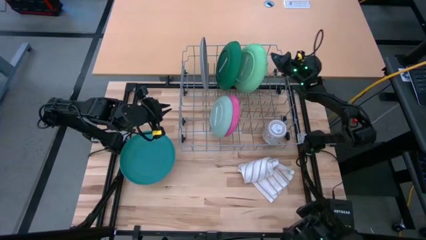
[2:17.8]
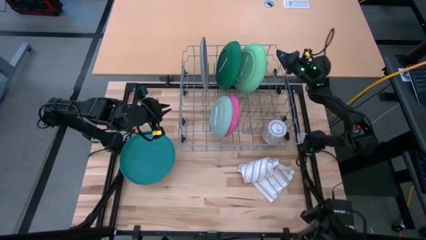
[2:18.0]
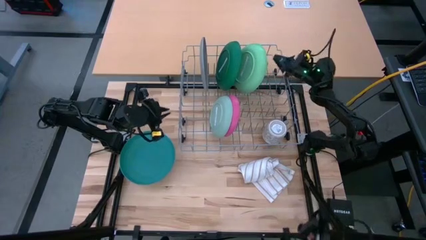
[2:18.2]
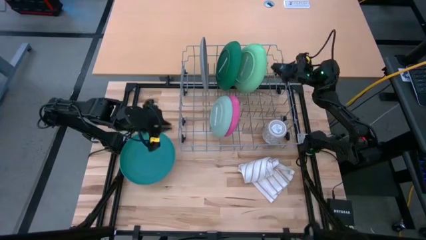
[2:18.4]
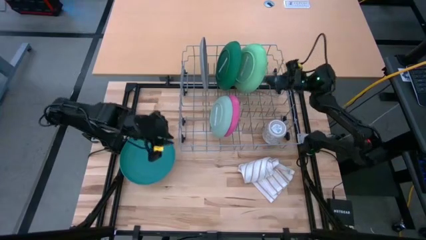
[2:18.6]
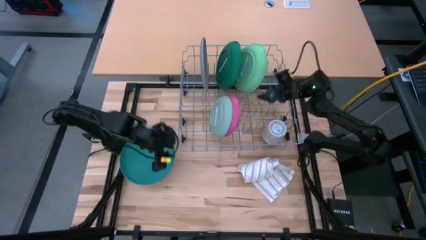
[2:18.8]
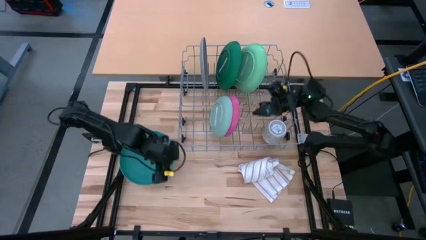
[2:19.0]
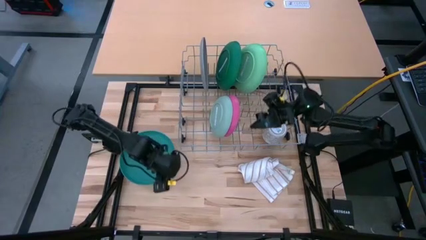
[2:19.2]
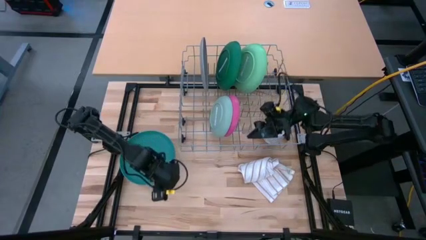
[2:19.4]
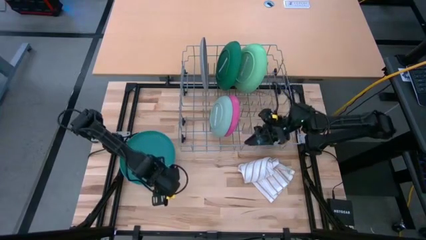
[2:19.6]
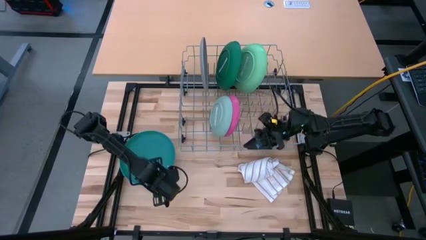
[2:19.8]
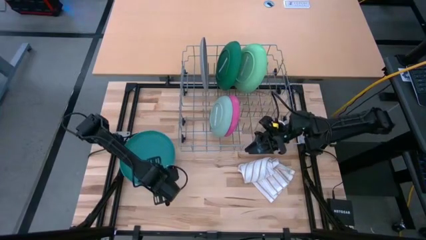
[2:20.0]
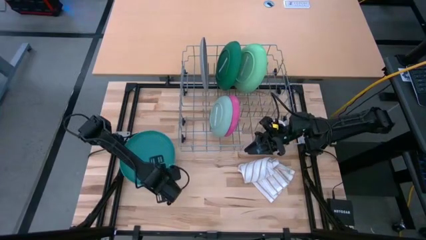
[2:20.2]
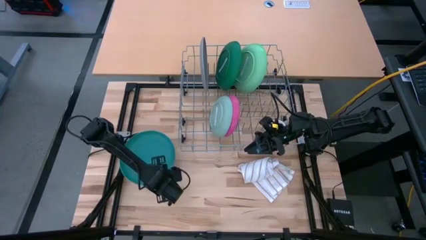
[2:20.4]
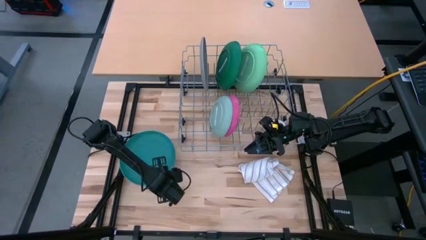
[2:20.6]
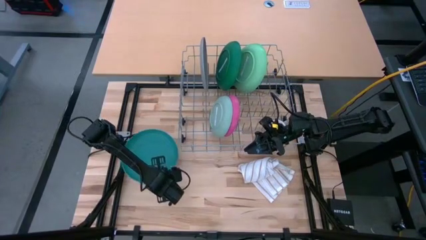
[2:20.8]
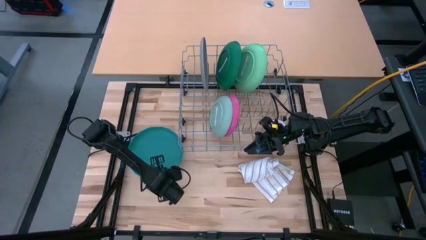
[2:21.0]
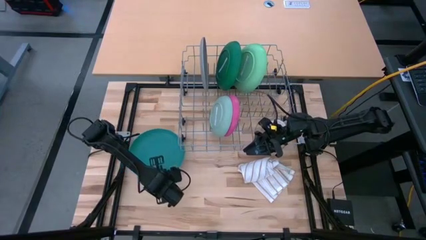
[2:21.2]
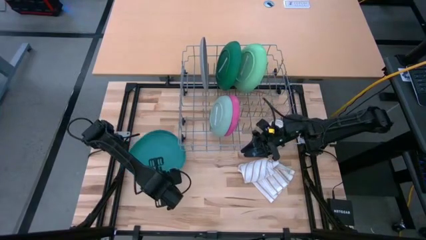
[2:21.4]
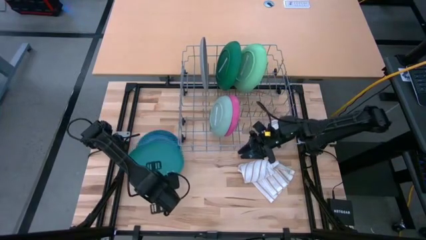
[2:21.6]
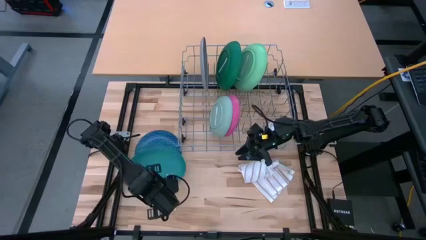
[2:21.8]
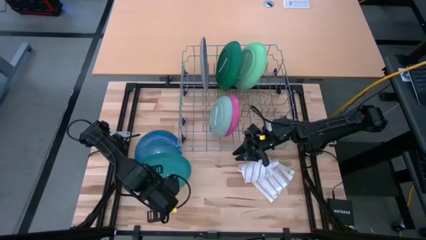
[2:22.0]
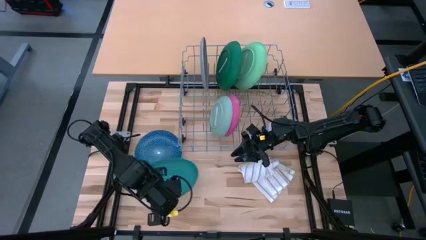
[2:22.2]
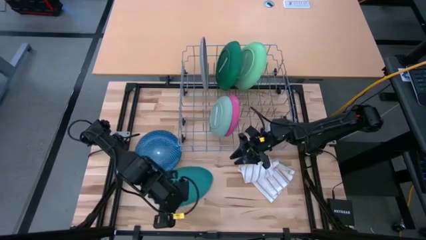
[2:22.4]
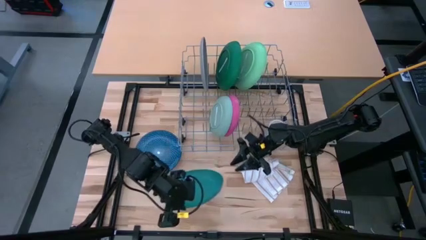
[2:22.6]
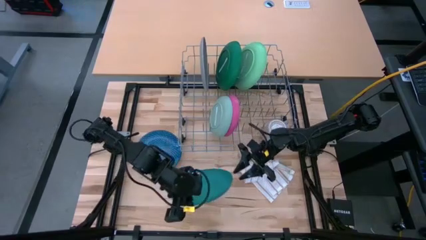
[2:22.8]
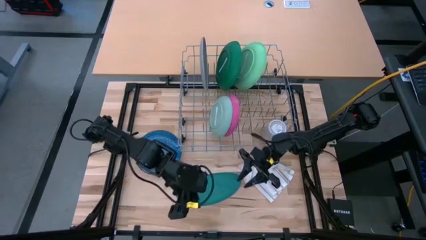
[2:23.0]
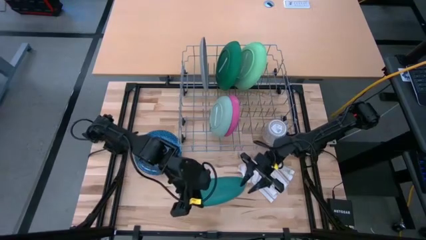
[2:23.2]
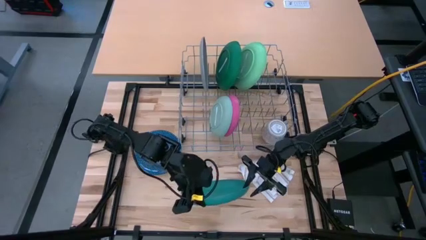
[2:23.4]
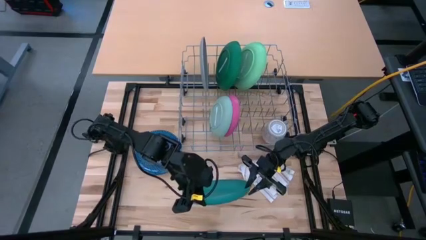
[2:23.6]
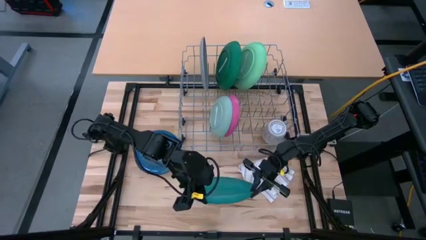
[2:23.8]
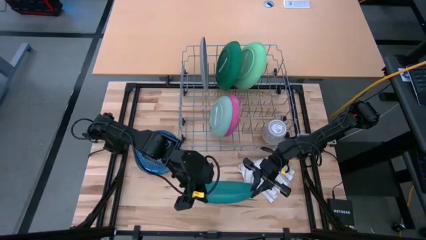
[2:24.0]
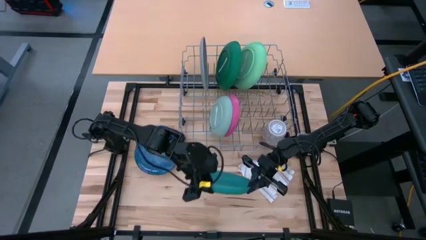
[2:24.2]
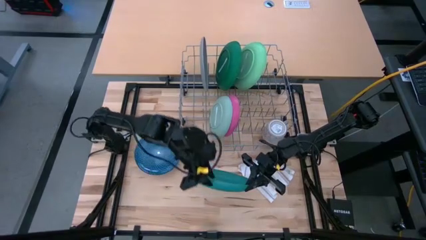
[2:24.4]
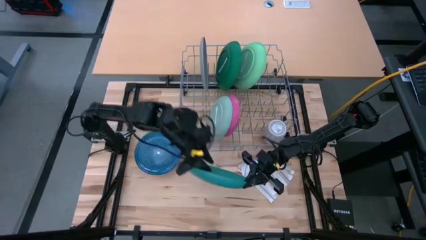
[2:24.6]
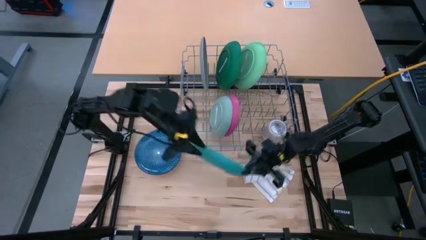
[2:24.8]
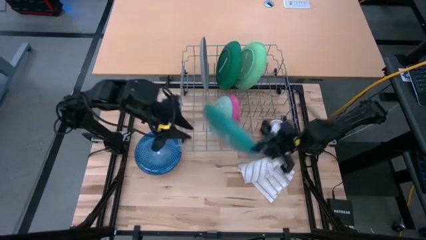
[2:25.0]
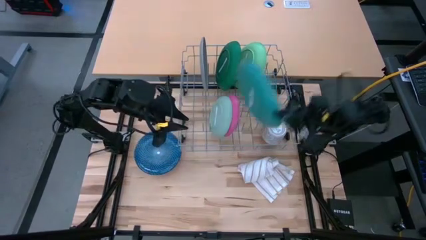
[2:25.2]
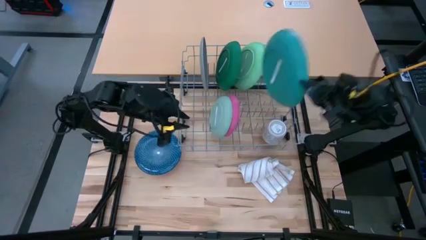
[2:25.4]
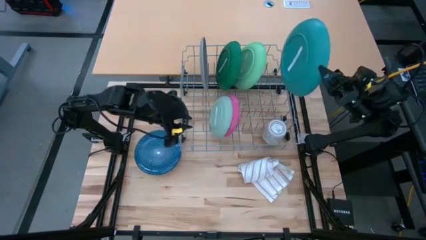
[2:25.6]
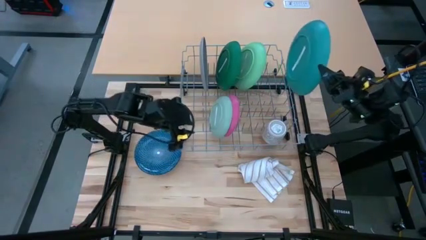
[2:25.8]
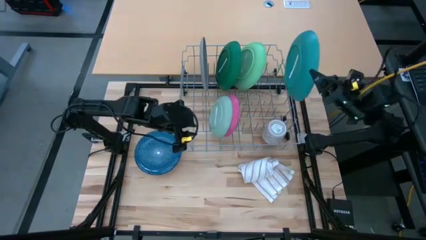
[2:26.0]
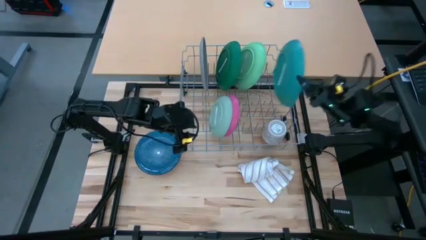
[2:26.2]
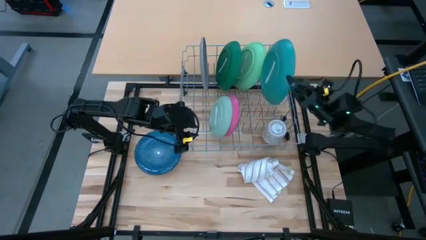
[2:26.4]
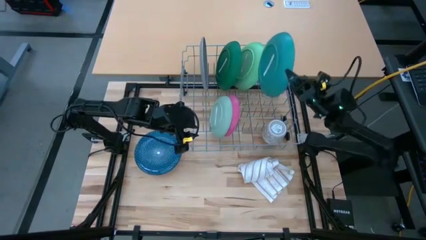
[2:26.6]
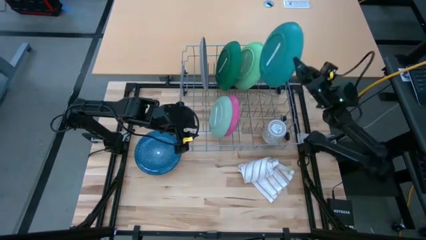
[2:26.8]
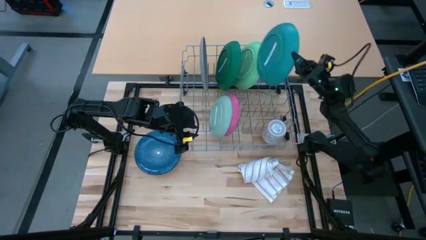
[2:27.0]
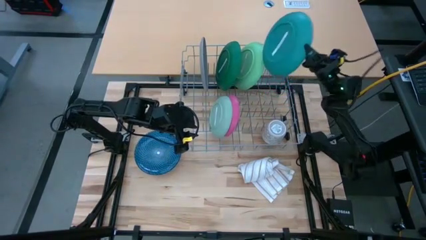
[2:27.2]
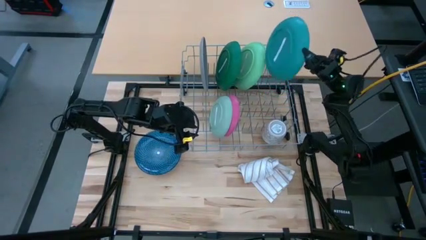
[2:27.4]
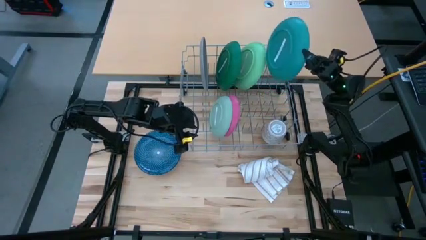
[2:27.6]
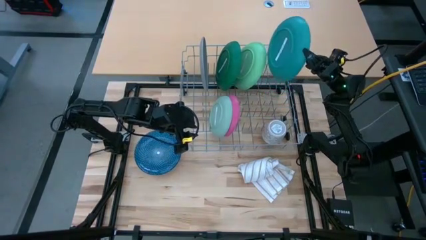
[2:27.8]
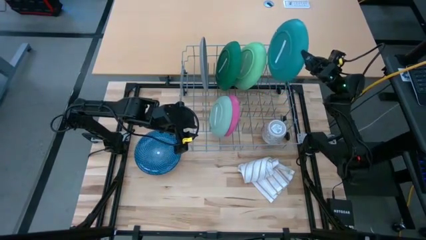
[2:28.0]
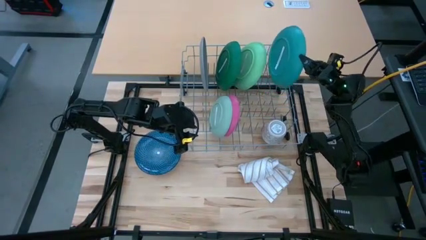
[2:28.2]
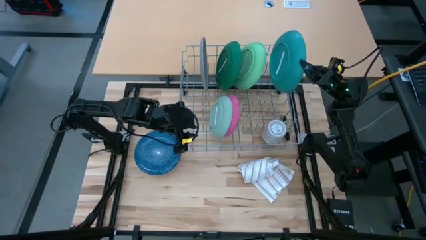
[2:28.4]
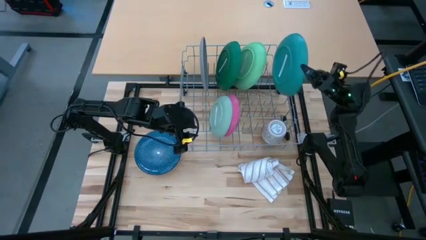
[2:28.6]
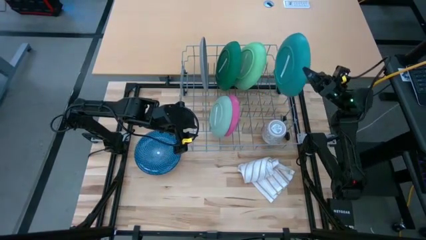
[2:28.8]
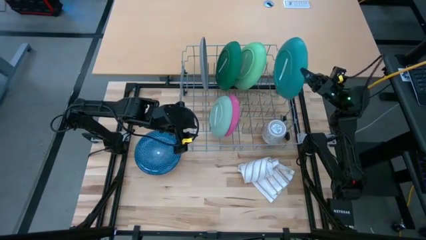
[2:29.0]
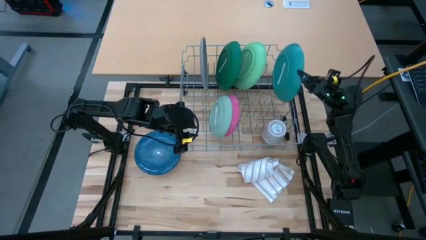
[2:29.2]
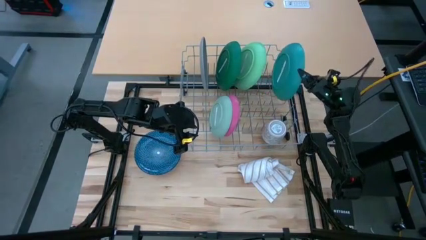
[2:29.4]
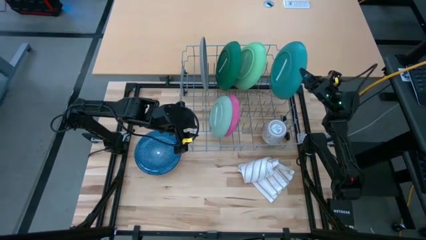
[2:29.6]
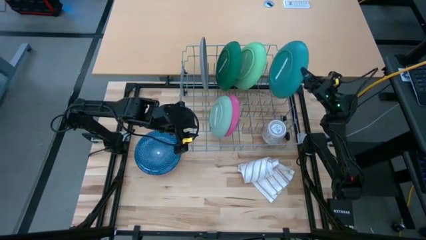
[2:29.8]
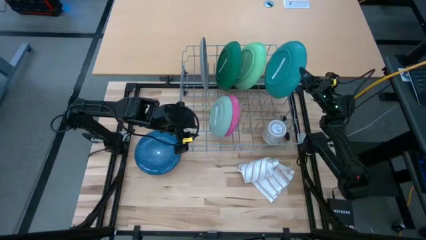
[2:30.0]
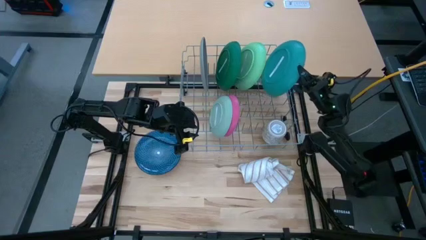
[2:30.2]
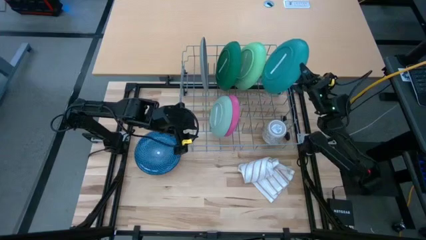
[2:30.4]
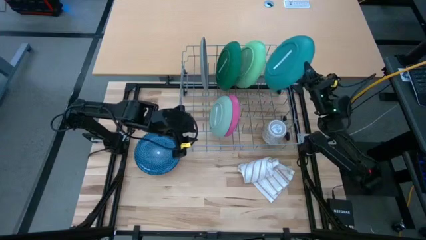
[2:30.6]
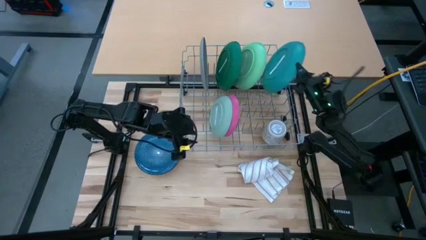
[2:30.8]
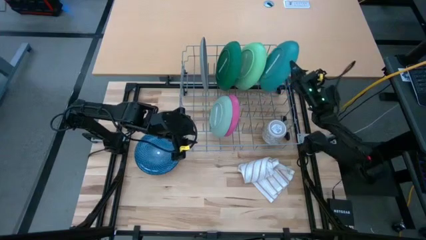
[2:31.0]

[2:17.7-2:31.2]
Task: Sort dishes
Put the blue plate in the dish rack
